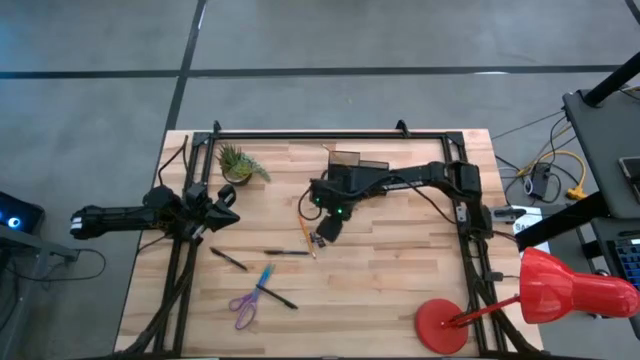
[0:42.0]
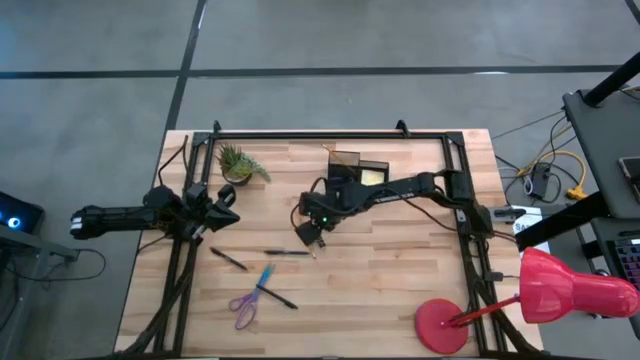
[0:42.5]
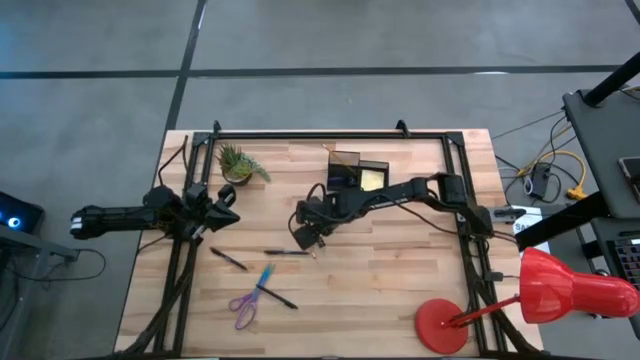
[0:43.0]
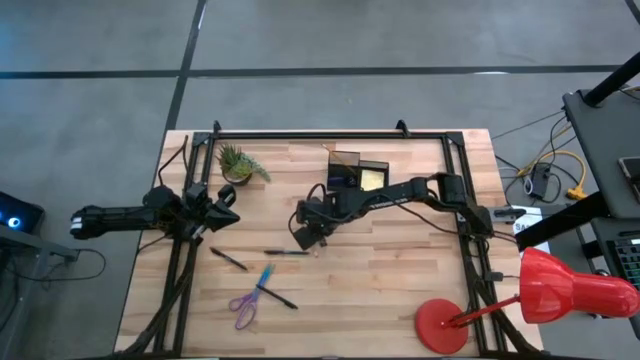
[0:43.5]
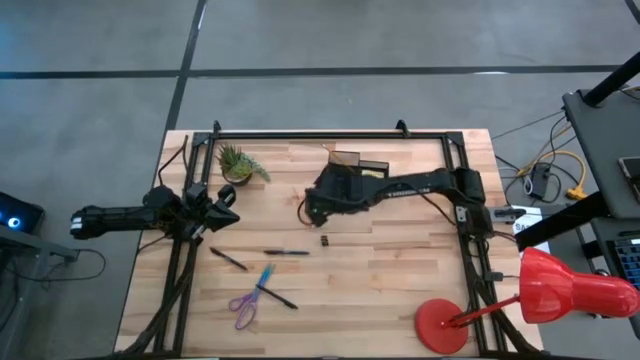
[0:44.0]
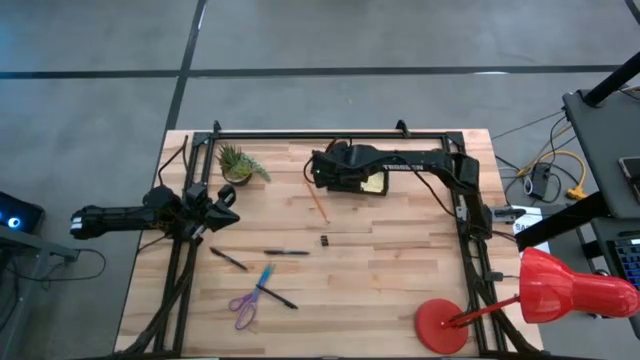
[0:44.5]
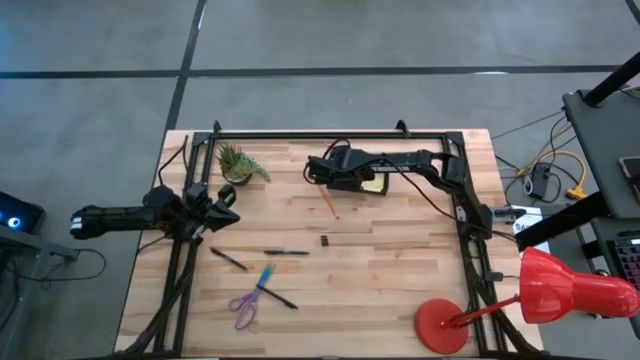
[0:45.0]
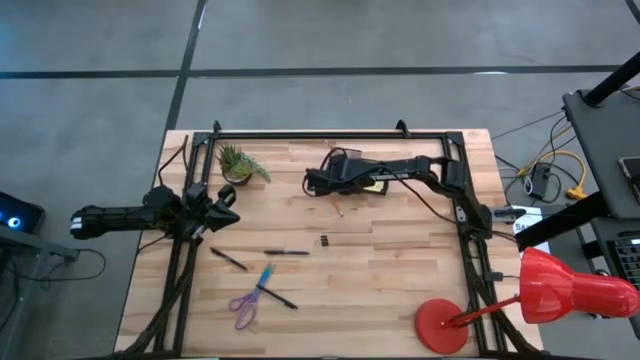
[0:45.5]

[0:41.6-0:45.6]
Task: Pick and place office supplies into organizer
Put the top black binder clip into the desk organizer

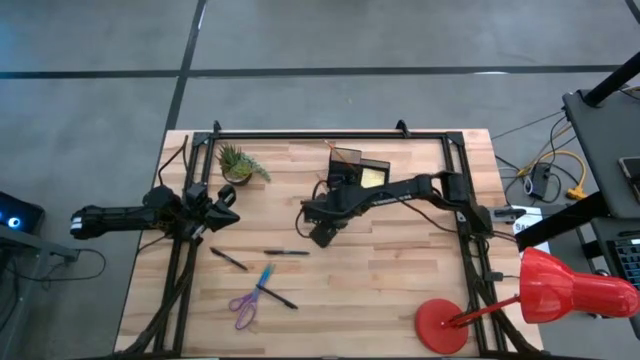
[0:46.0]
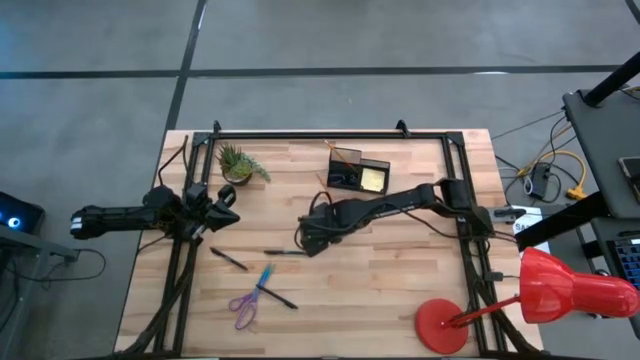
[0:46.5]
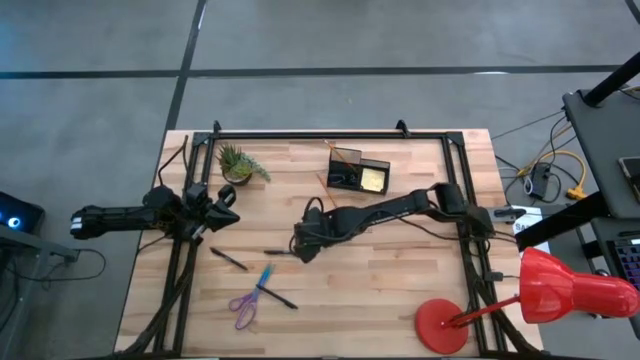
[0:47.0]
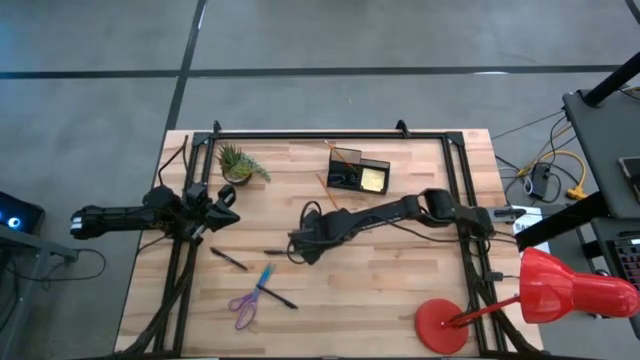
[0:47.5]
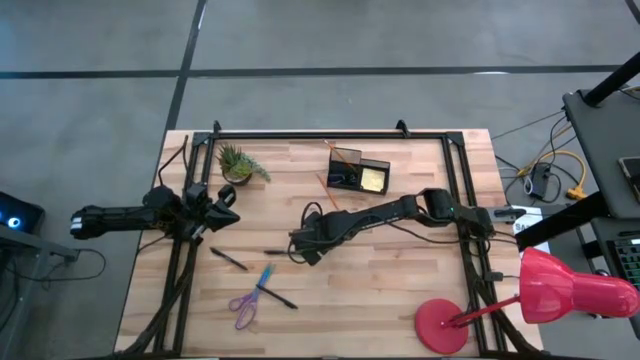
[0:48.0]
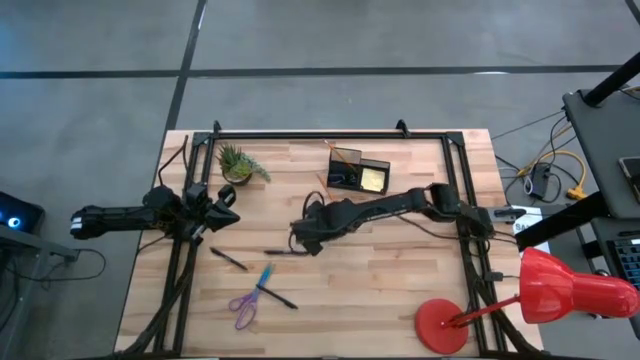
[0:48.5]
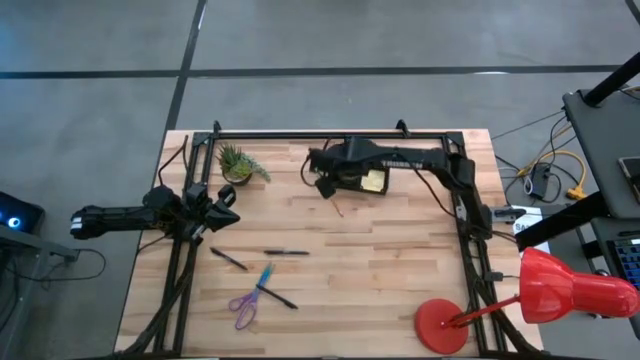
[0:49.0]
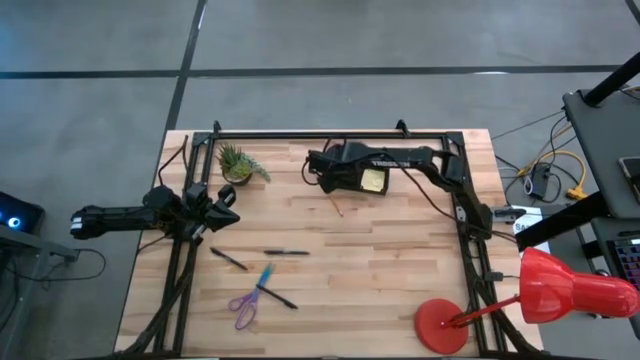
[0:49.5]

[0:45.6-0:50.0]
Put the black binder clip into the desk organizer

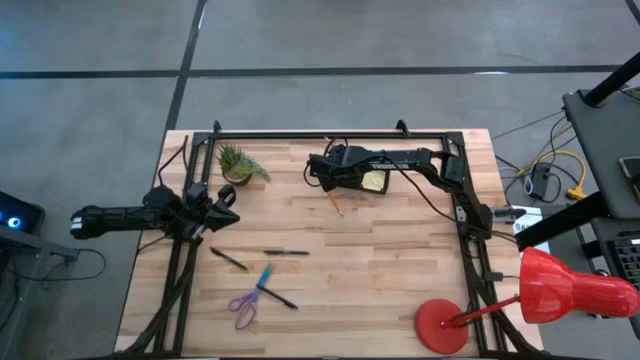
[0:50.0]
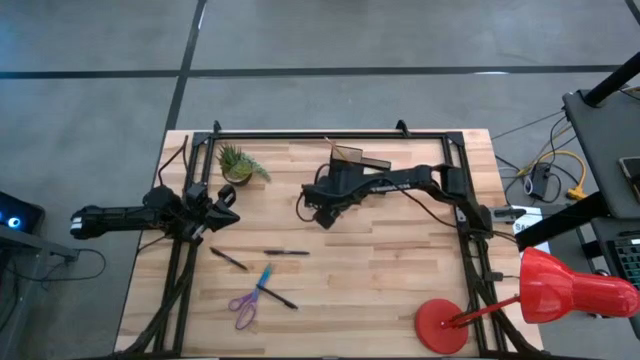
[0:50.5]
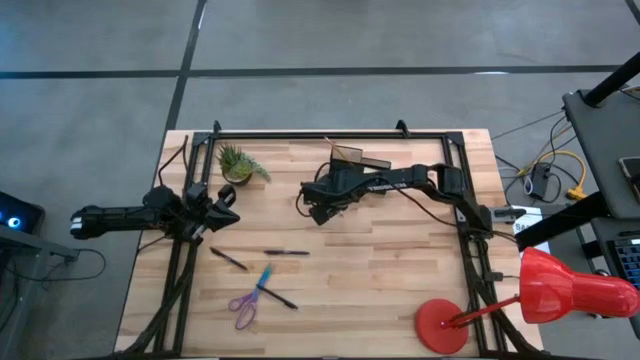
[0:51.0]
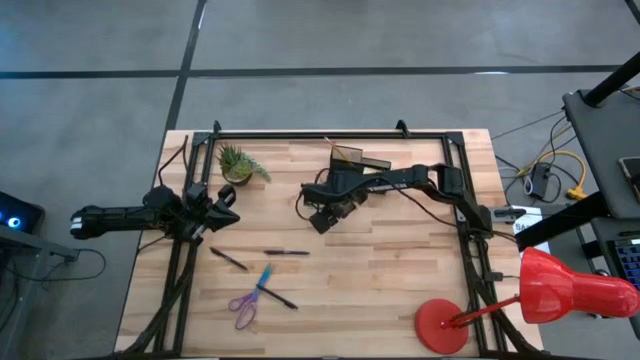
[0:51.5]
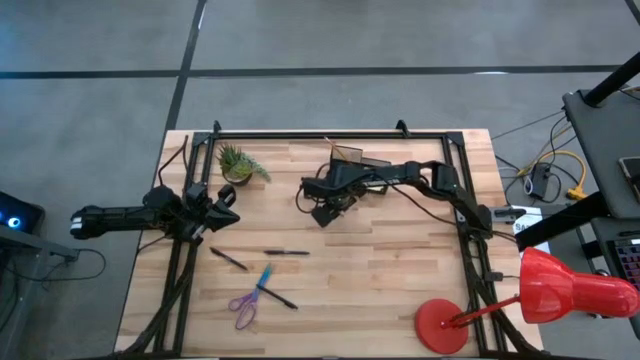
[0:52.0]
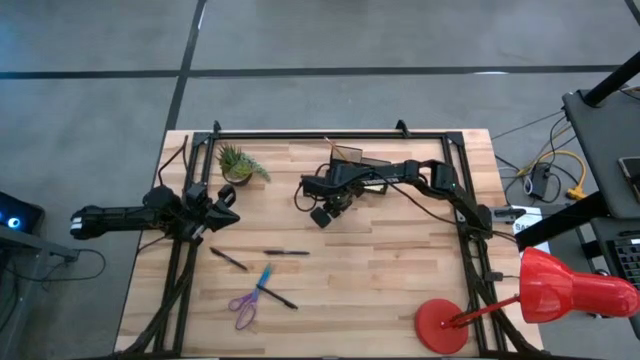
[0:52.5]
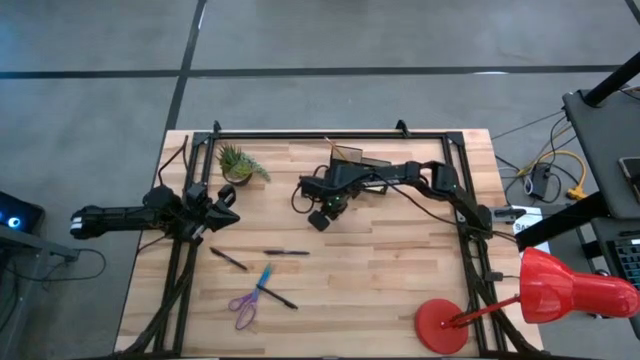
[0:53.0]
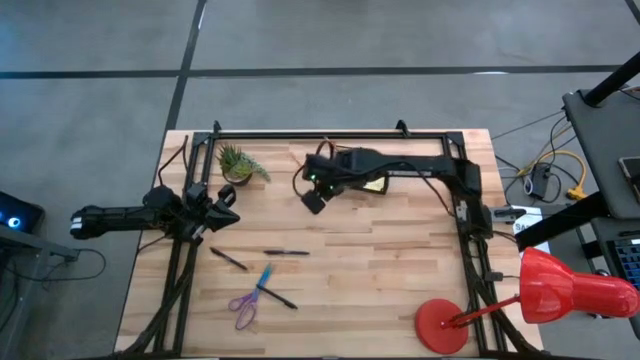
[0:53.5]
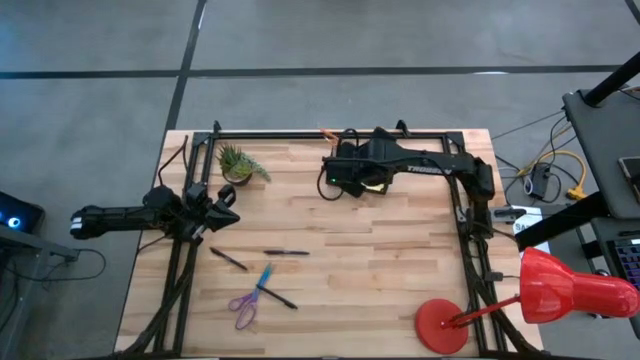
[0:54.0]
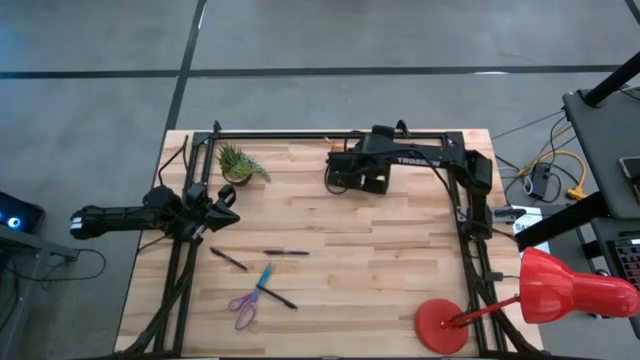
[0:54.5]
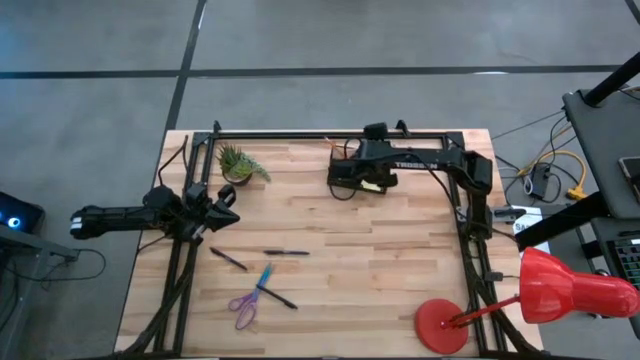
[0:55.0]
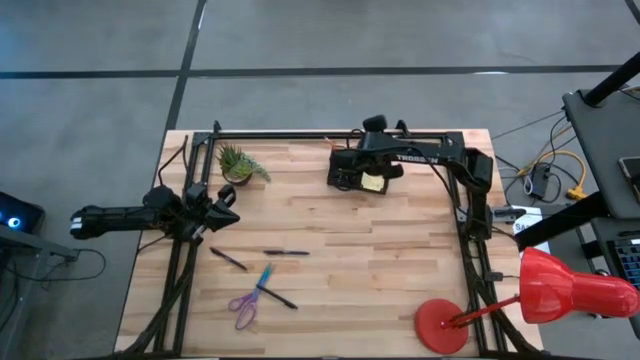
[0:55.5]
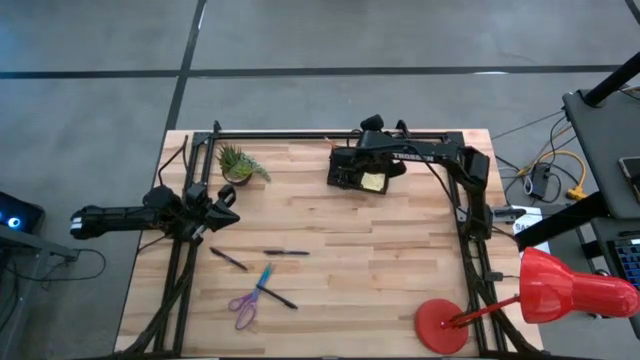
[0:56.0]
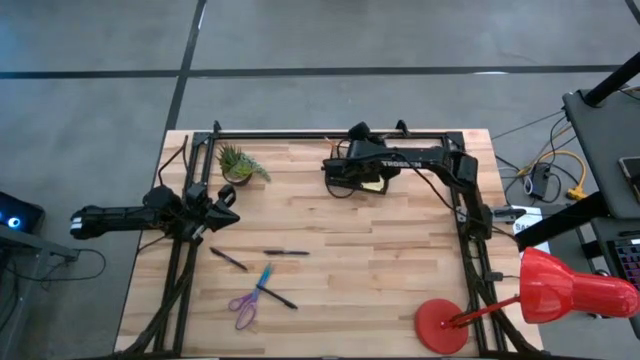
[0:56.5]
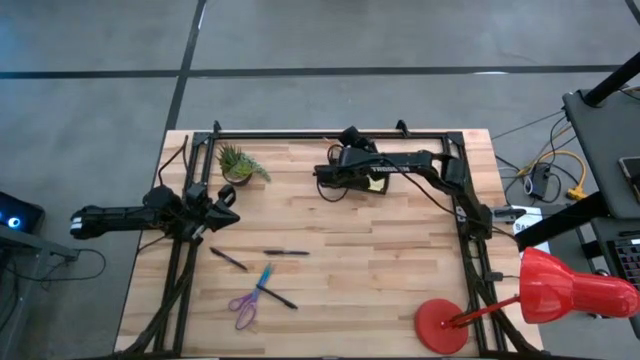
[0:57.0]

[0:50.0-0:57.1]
Put the orange pencil into the black desk organizer

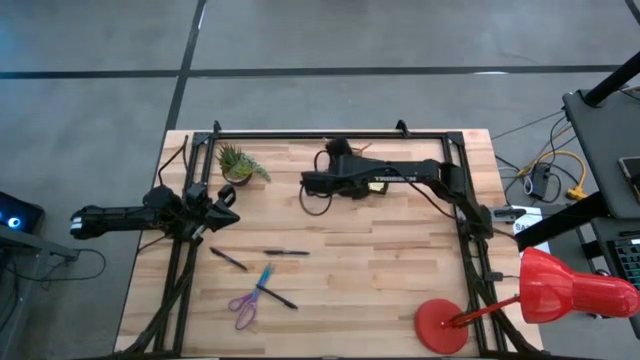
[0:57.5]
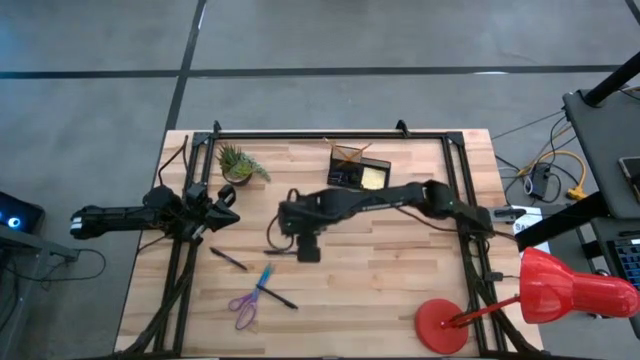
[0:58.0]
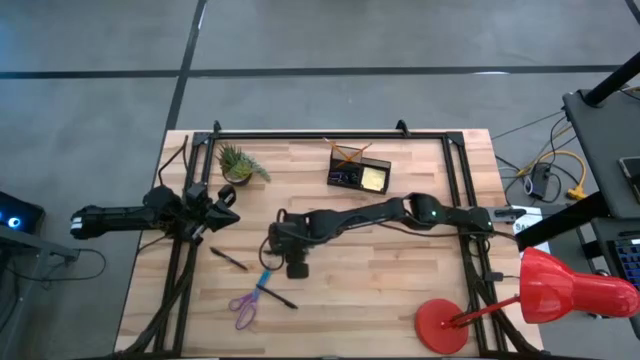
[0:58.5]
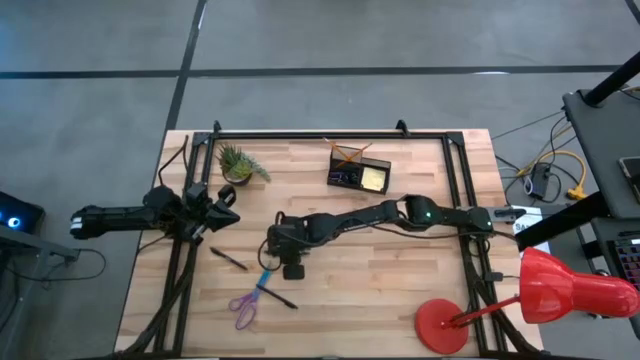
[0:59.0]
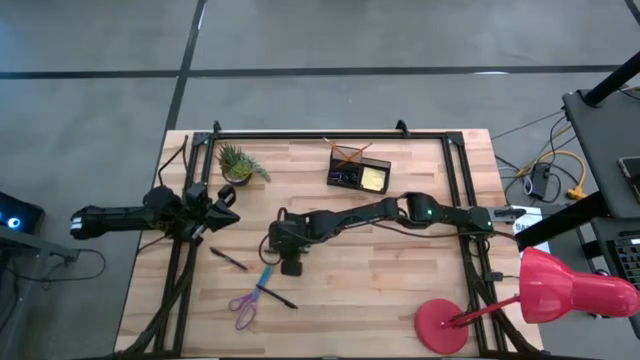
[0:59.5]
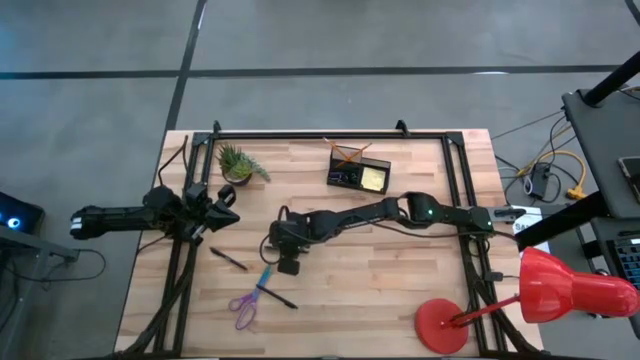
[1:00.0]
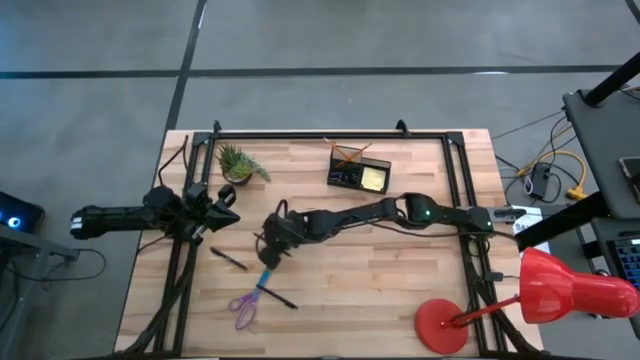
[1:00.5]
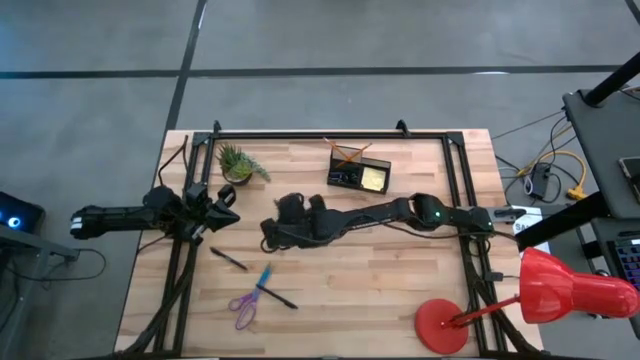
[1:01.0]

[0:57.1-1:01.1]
Put the top black pen into the black desk organizer

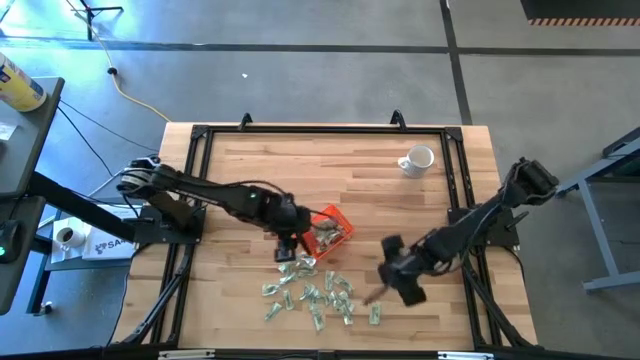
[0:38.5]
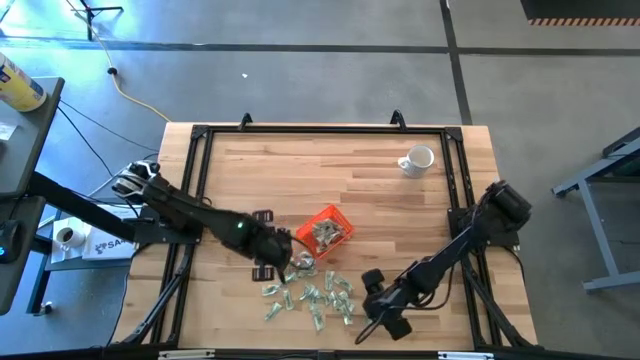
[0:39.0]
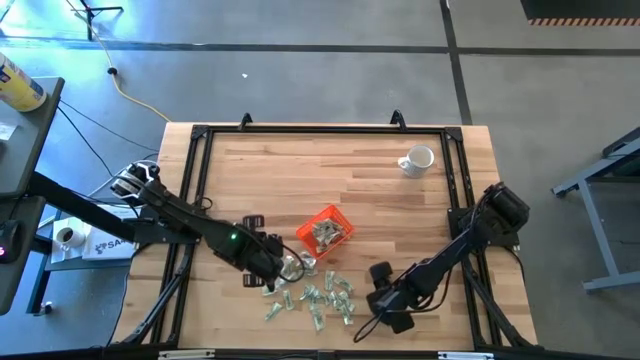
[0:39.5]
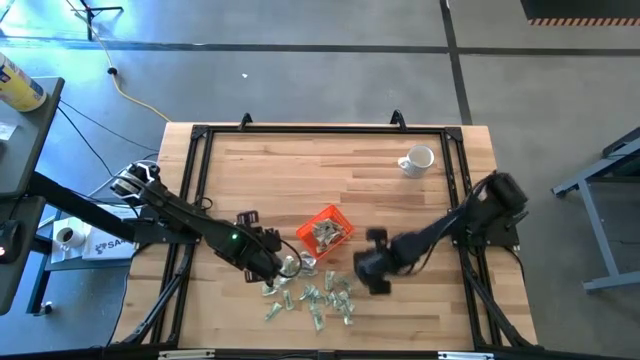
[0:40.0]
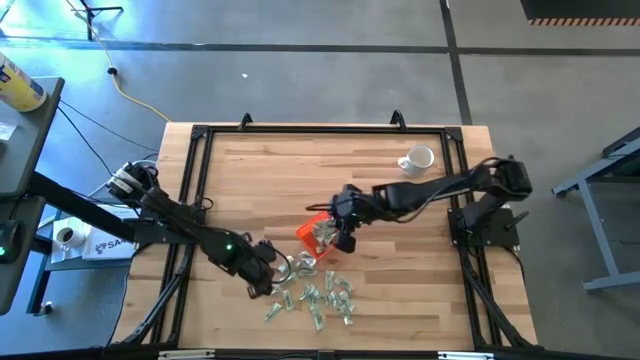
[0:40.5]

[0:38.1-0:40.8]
Task: Pick and place Stevia / Truvia into bins
Put the stevia packet into the orange bin
